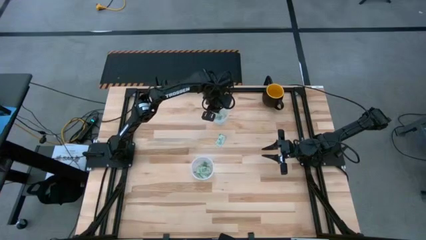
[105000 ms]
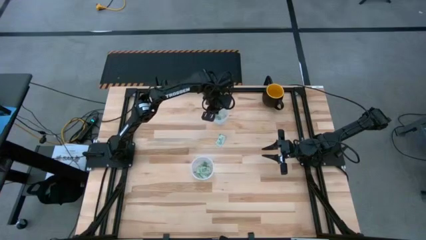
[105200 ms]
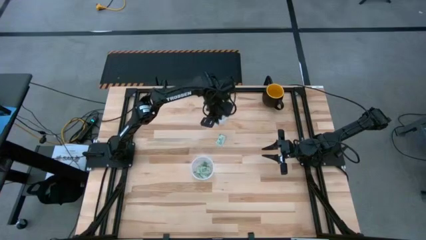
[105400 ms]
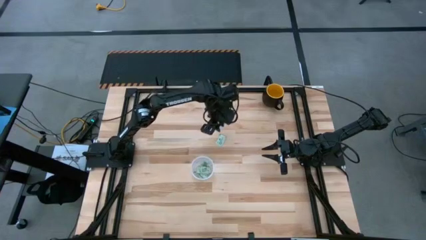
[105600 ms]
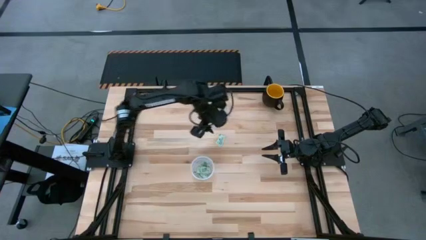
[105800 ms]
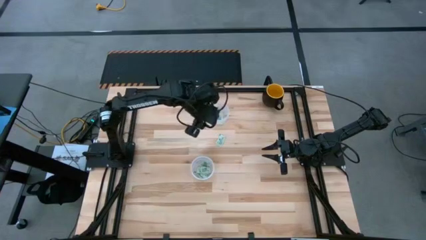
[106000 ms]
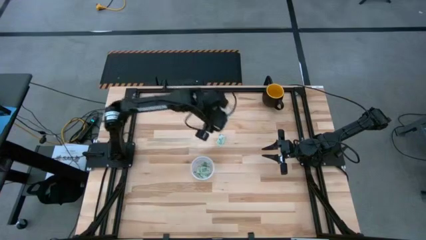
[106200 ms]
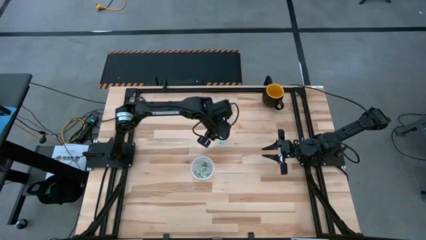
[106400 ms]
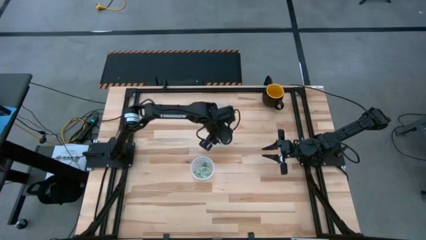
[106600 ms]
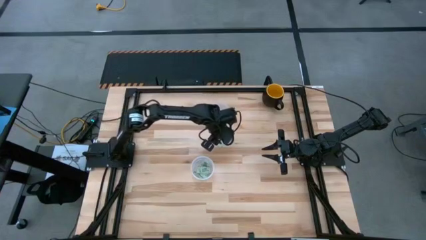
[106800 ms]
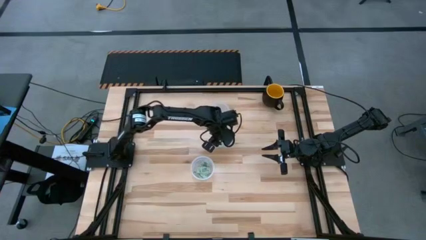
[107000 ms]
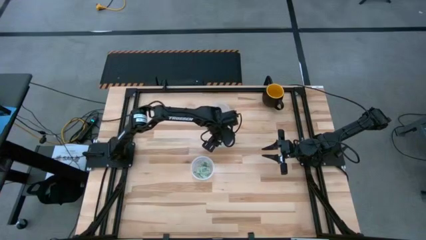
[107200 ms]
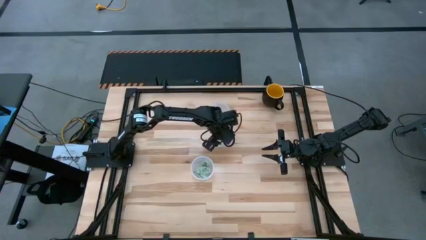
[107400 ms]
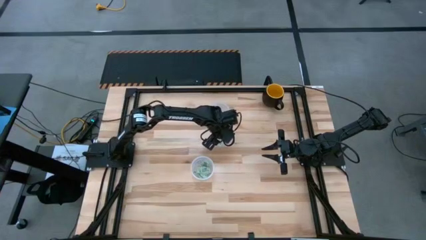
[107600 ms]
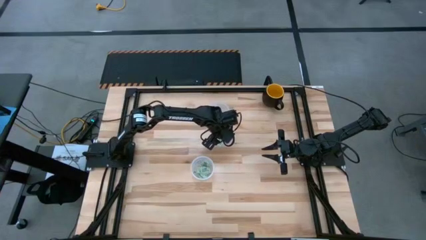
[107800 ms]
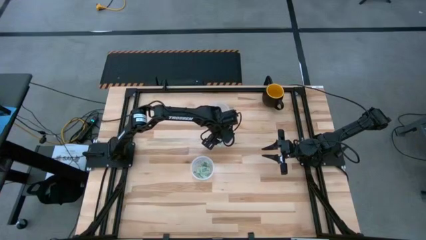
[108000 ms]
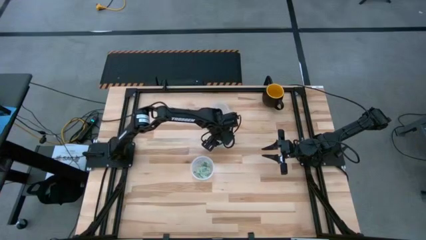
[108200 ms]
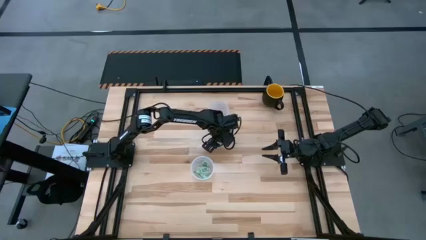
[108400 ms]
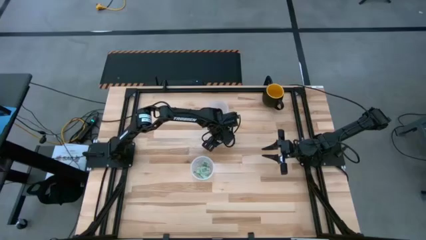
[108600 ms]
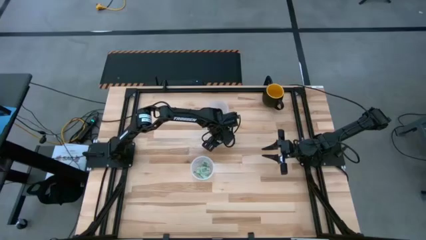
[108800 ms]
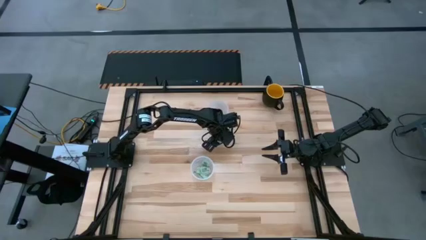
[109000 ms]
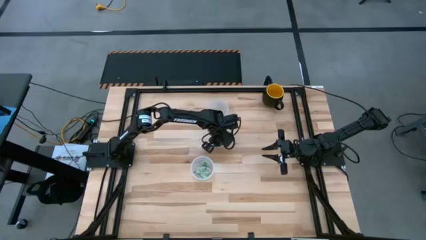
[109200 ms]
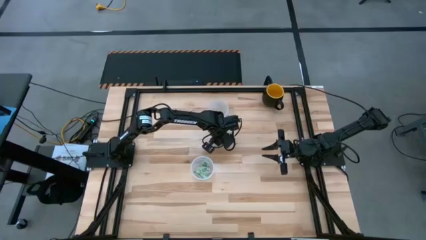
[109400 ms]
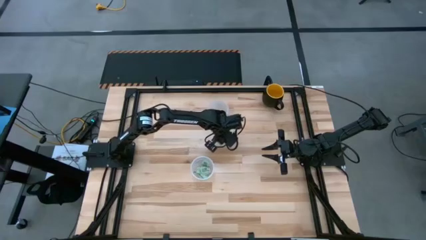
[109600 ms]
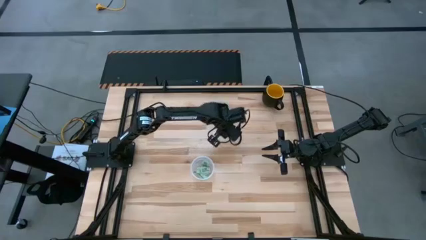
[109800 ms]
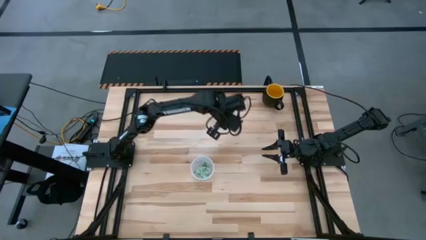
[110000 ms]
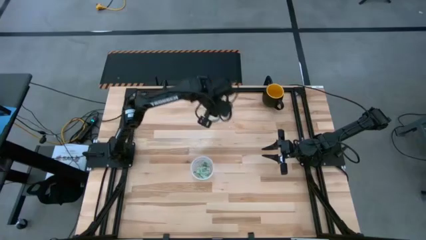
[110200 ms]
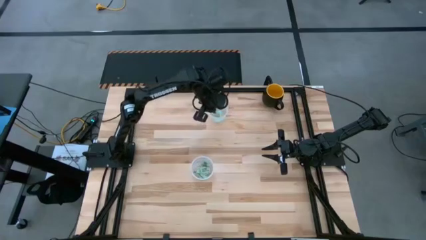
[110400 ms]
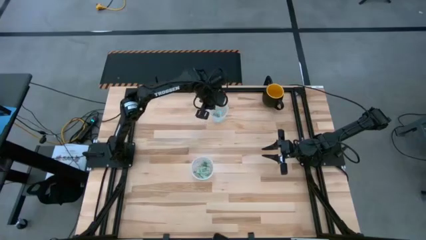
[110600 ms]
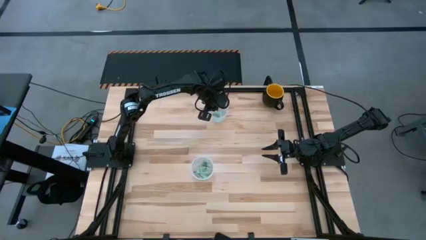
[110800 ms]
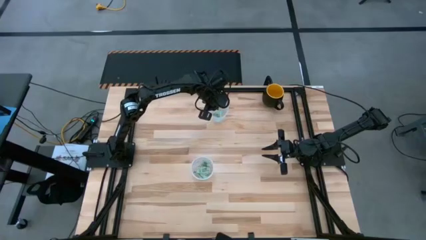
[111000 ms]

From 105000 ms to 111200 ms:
Task: Pick and place items into bin
Put the top left stevia packet into the top bin

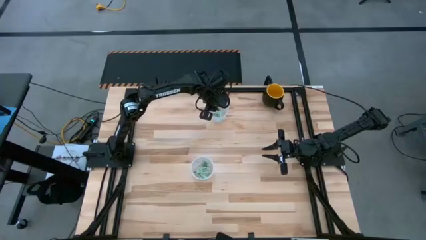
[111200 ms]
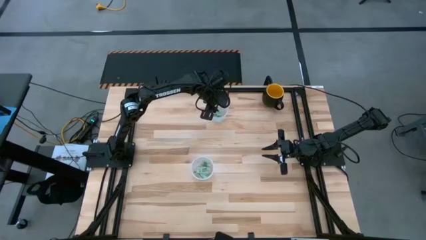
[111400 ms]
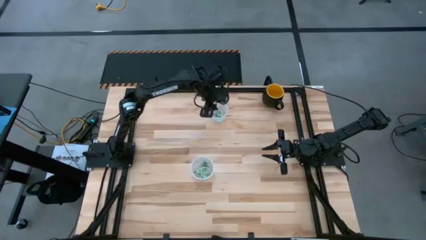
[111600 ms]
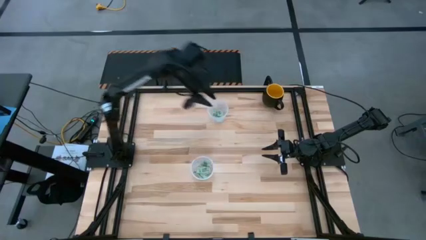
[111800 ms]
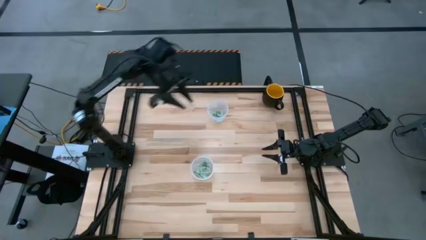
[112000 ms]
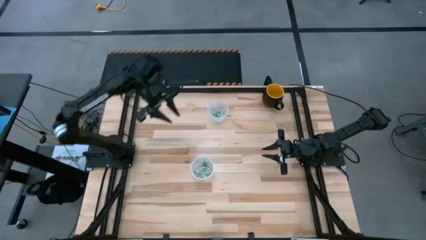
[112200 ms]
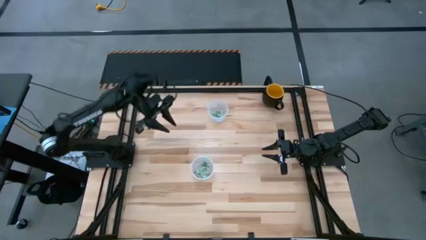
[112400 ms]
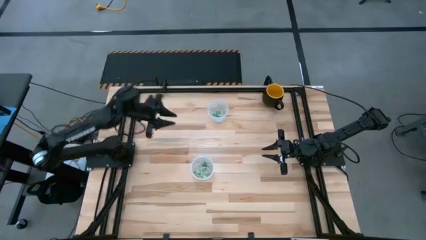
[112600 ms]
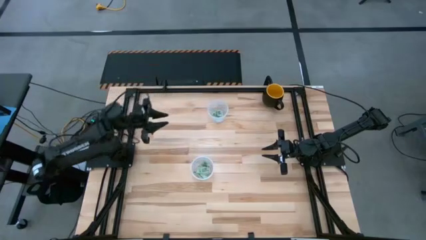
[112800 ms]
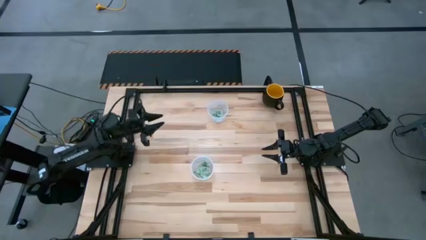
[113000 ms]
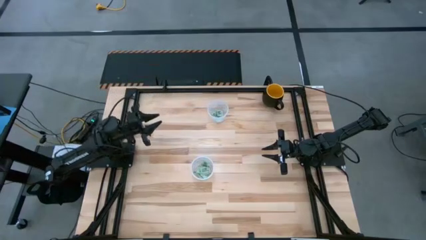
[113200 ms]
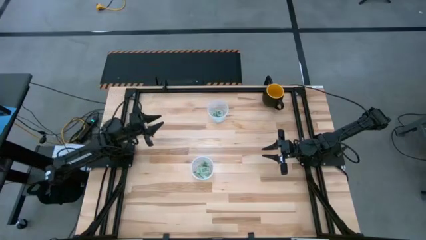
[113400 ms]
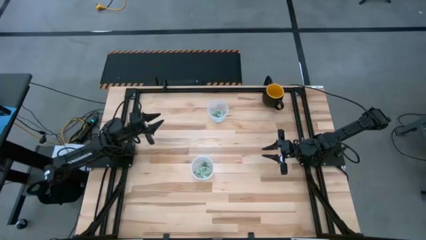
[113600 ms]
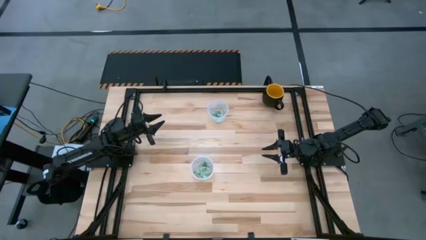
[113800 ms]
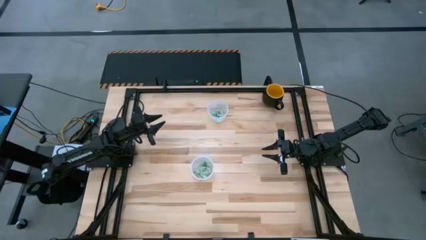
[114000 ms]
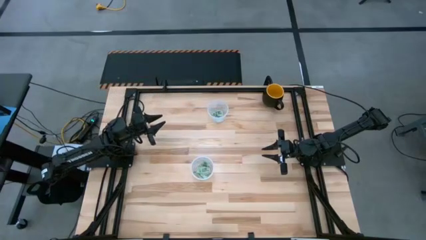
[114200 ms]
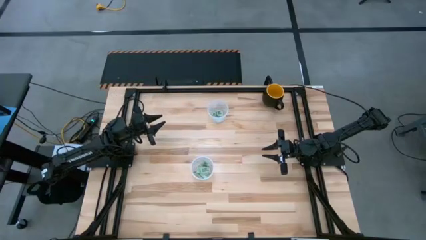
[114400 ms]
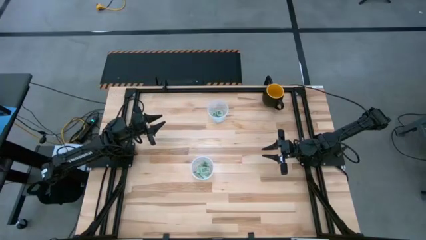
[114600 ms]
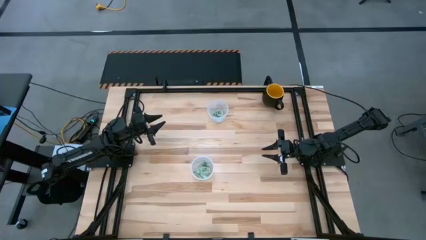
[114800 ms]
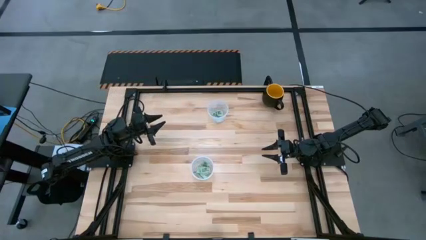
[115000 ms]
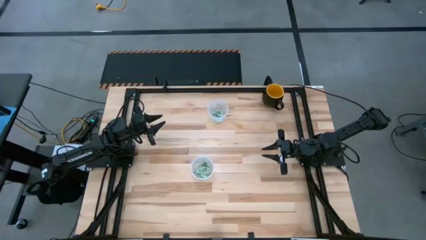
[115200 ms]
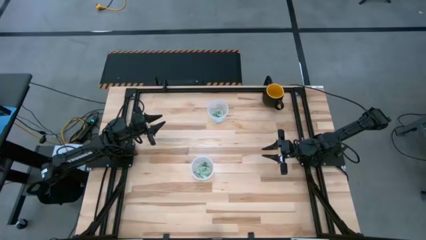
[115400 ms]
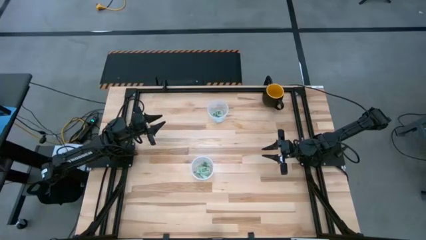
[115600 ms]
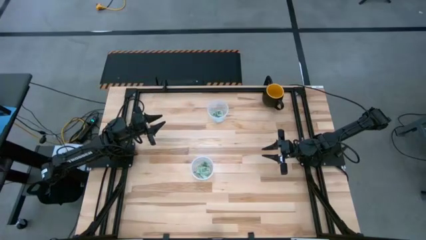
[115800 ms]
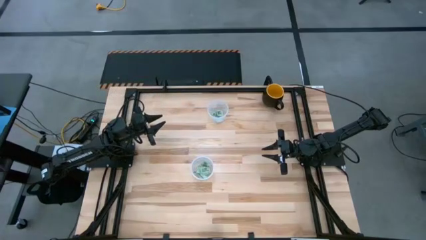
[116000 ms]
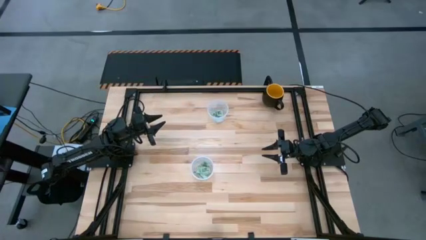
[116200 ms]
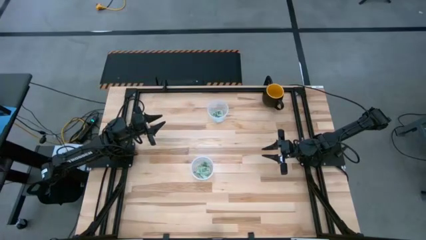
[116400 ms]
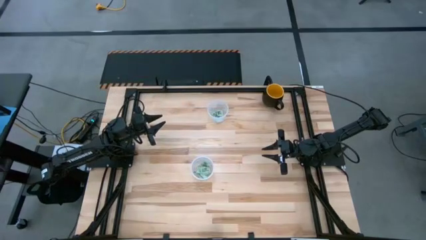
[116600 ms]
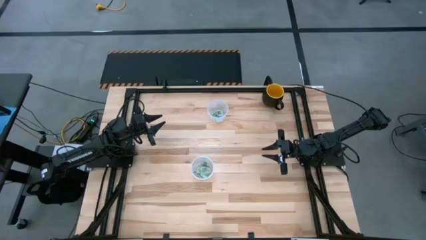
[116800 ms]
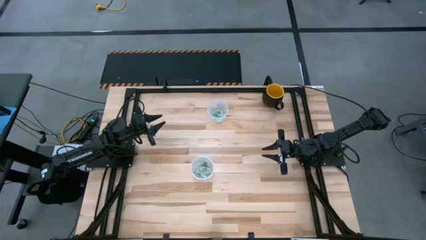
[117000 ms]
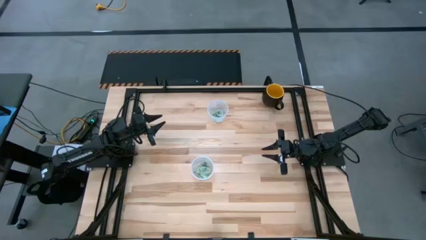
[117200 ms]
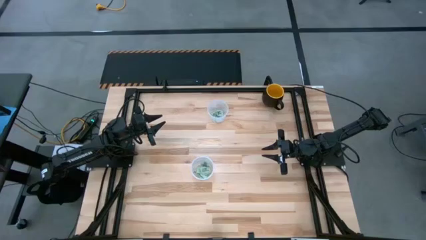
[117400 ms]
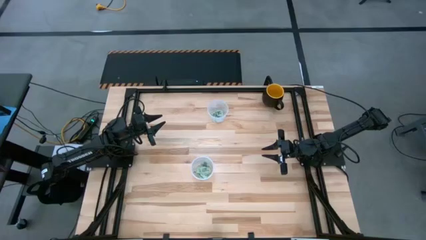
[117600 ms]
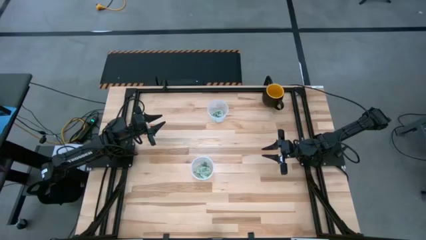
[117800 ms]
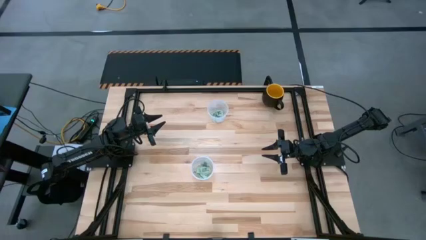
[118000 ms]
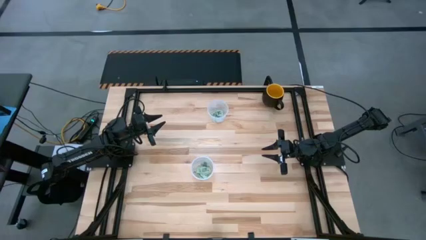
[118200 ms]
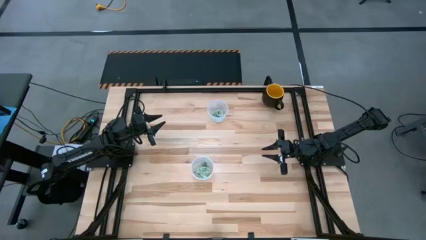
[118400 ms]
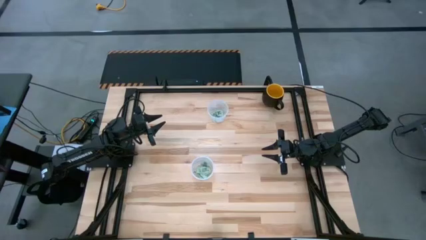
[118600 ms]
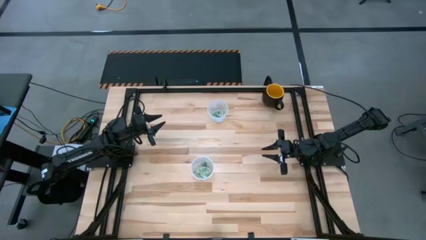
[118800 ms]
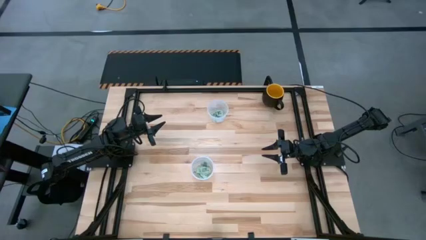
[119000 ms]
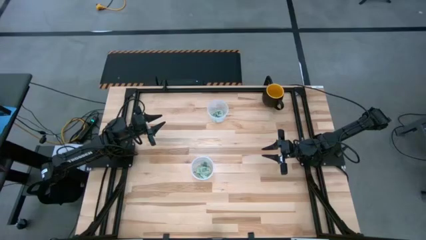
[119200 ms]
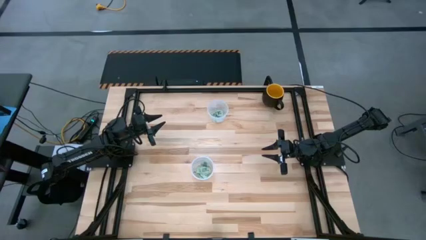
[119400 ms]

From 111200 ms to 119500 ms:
Return to Home Position

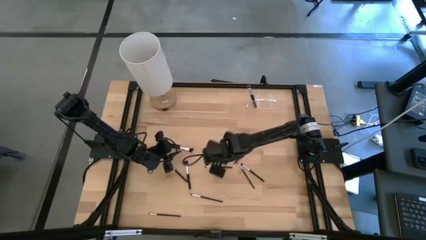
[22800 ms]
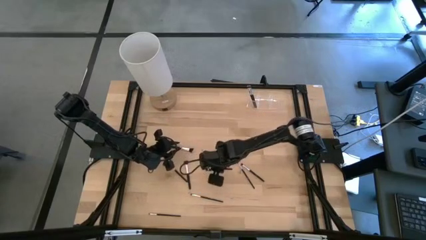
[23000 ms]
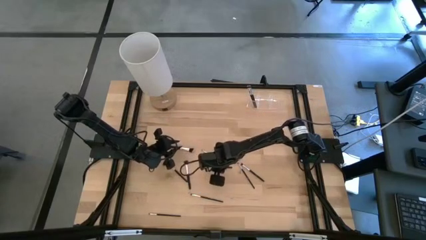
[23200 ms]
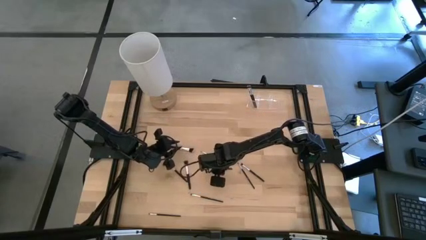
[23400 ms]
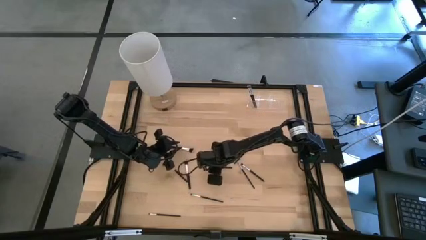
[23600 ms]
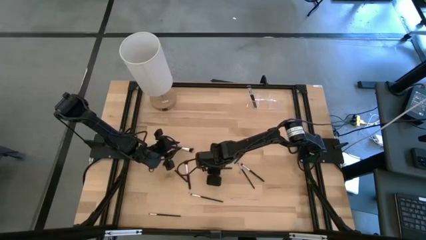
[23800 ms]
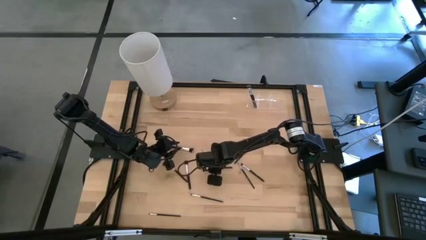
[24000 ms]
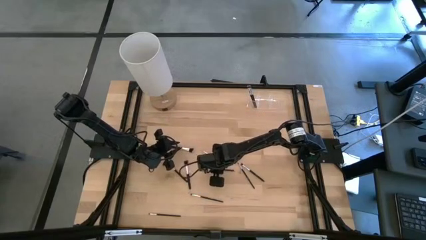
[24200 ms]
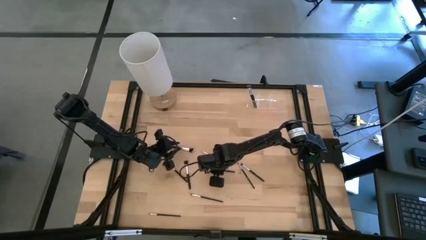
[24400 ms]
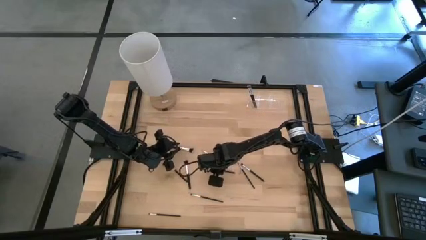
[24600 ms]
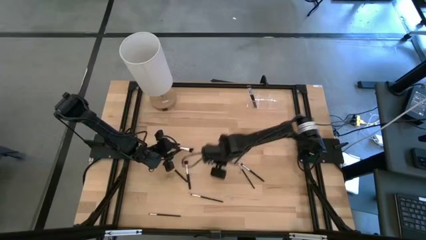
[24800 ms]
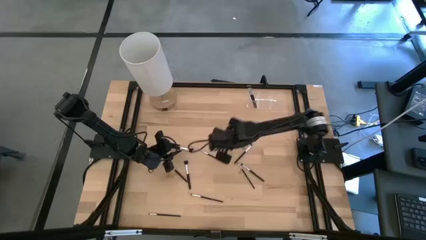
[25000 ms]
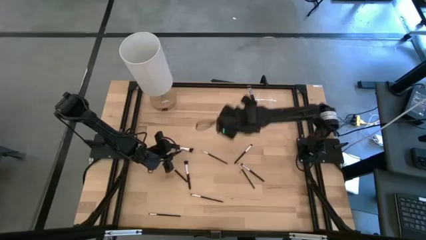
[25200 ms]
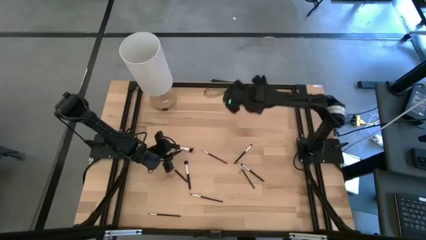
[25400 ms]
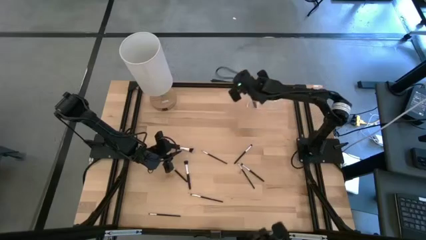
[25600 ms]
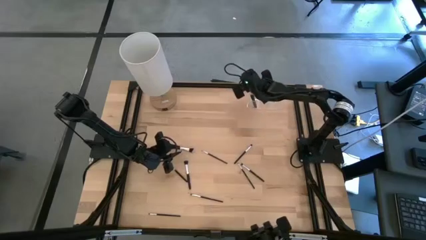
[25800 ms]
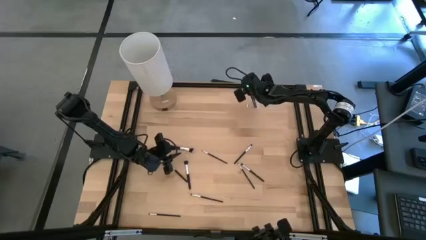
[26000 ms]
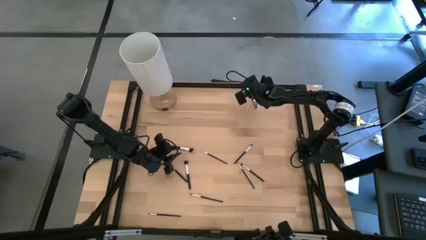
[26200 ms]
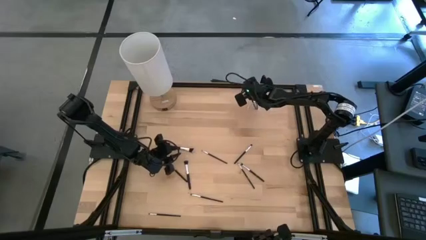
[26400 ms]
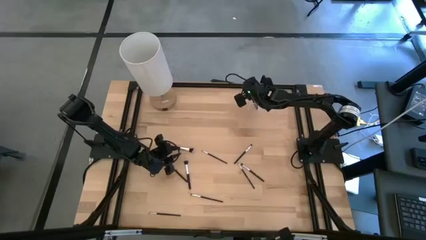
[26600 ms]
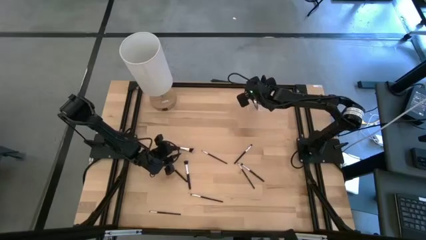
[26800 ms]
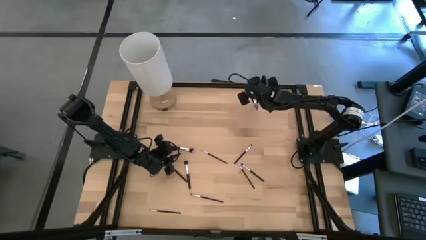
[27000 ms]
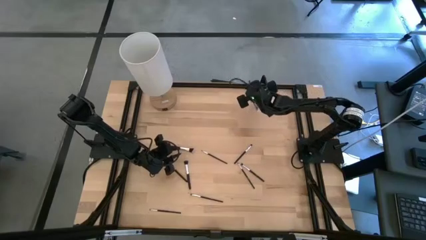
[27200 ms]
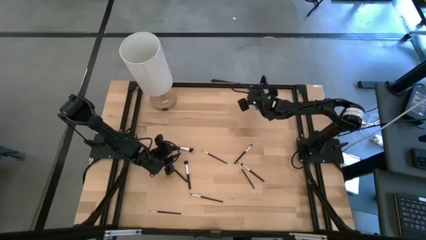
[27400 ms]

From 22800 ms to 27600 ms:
Task: Put items in baskets/containers
Put the eyeshadow brush into the left side of the transparent organizer
